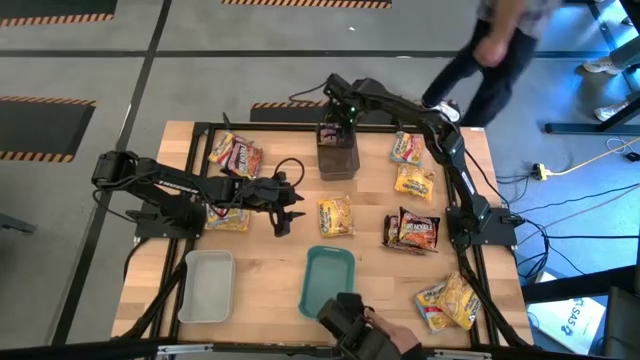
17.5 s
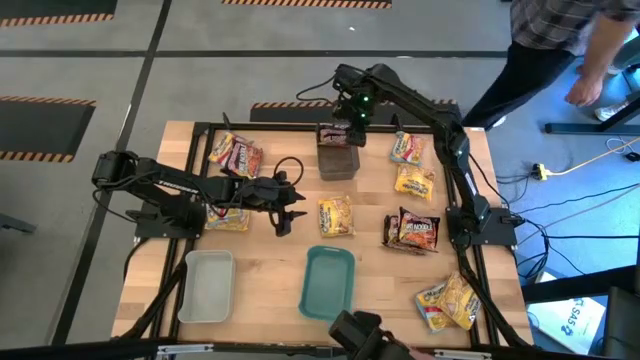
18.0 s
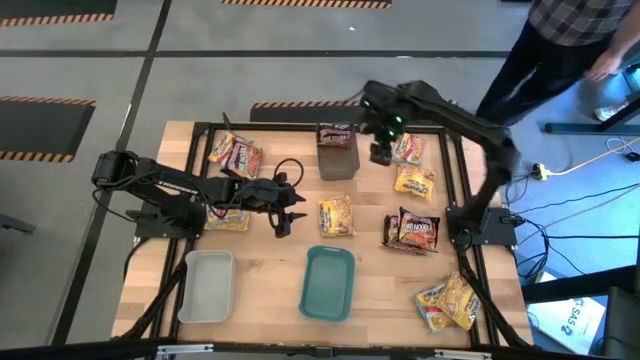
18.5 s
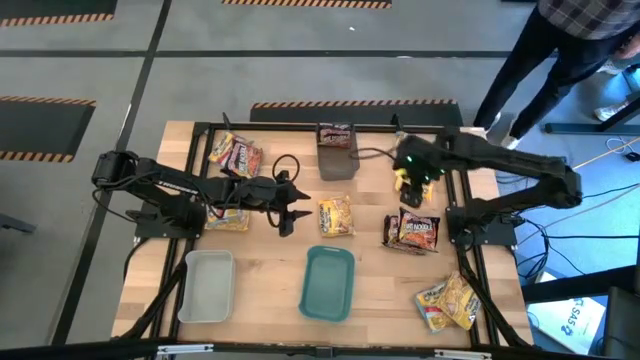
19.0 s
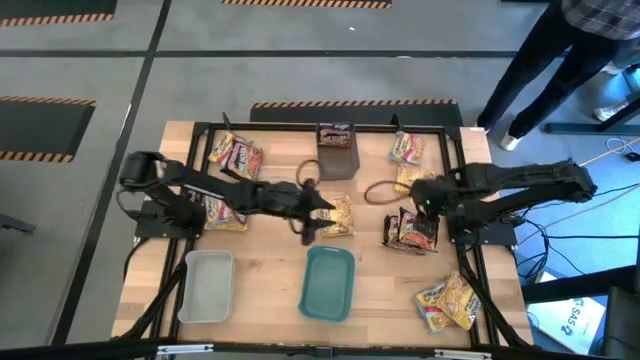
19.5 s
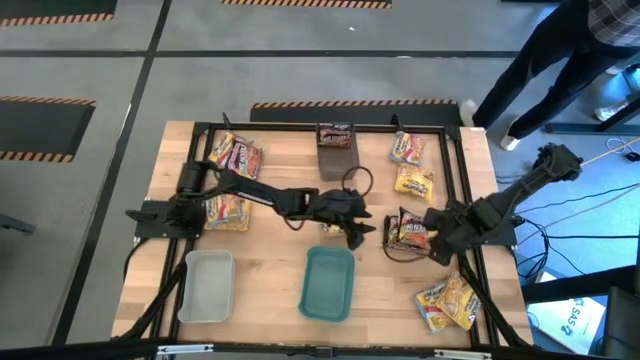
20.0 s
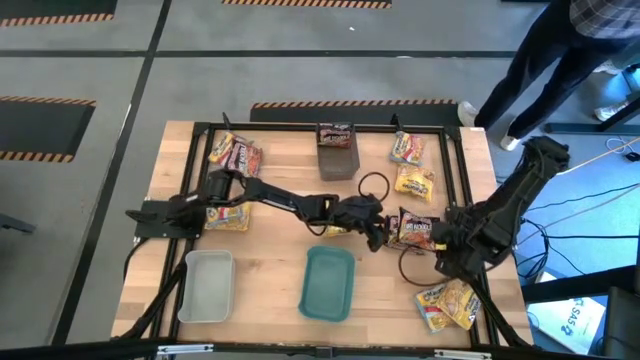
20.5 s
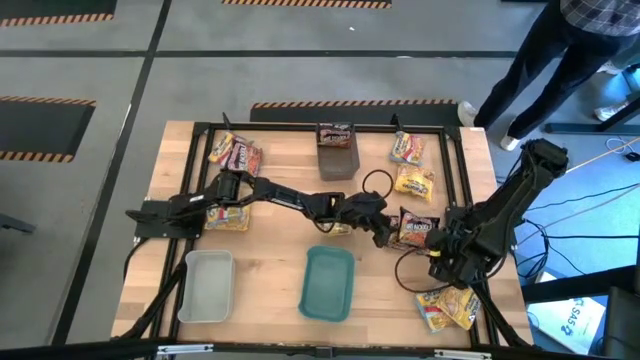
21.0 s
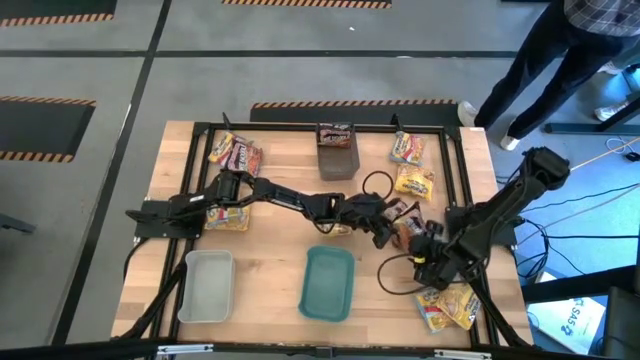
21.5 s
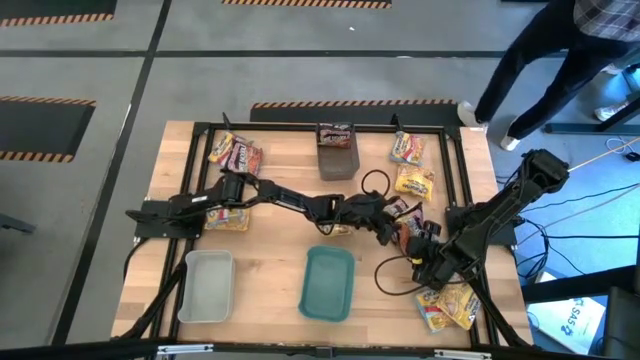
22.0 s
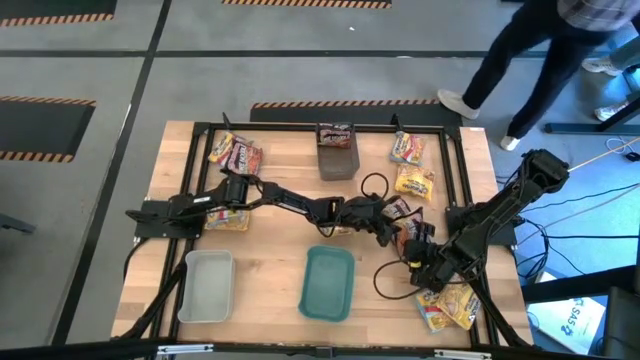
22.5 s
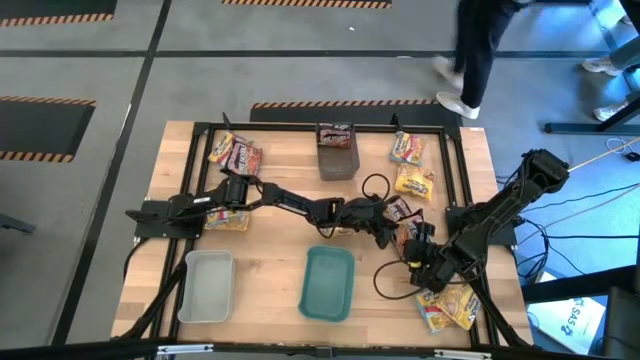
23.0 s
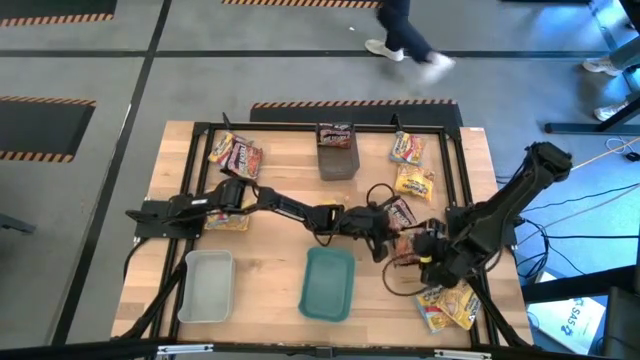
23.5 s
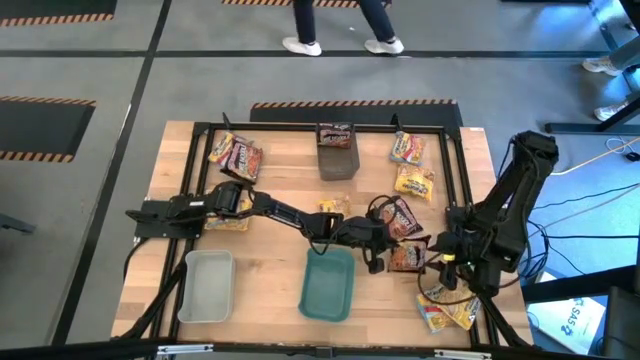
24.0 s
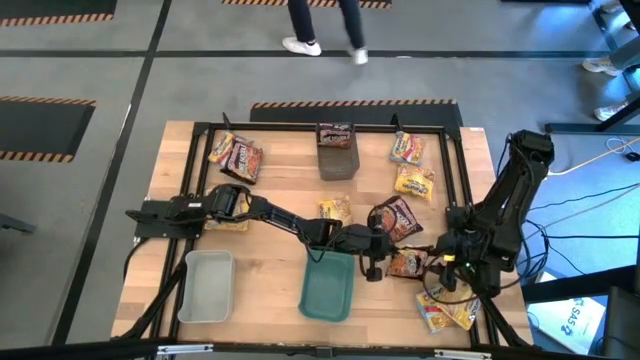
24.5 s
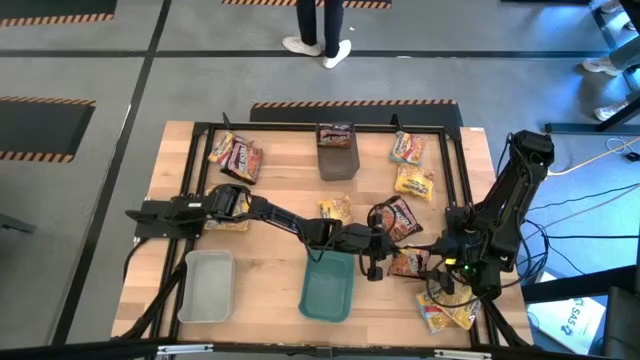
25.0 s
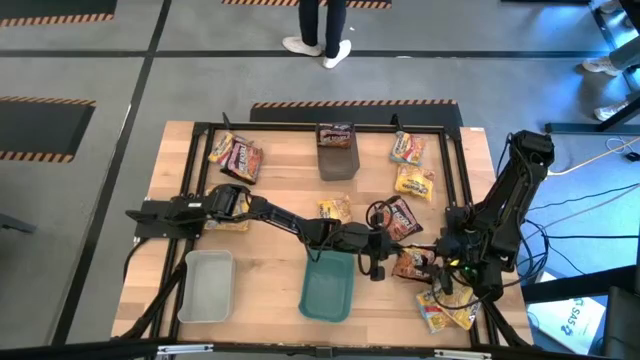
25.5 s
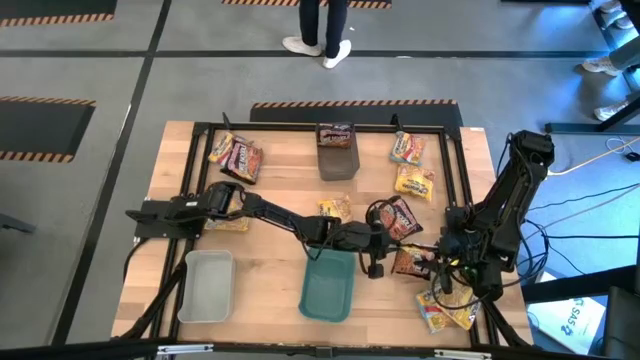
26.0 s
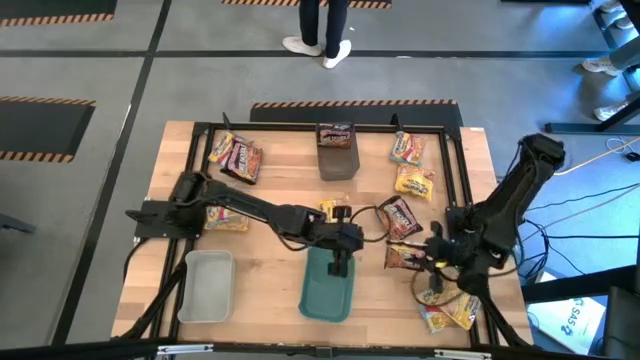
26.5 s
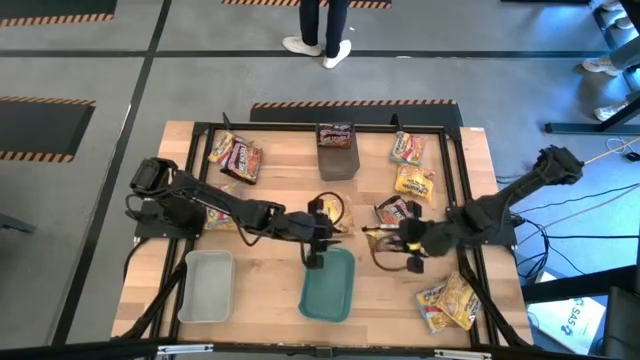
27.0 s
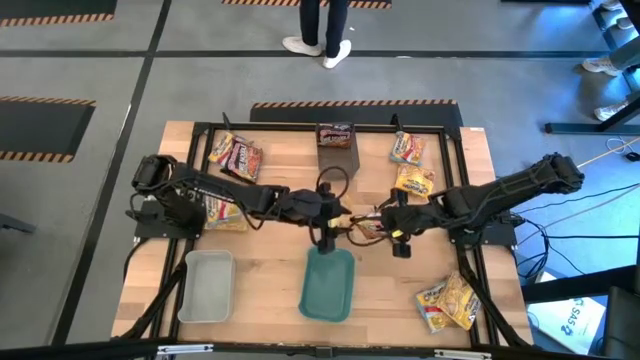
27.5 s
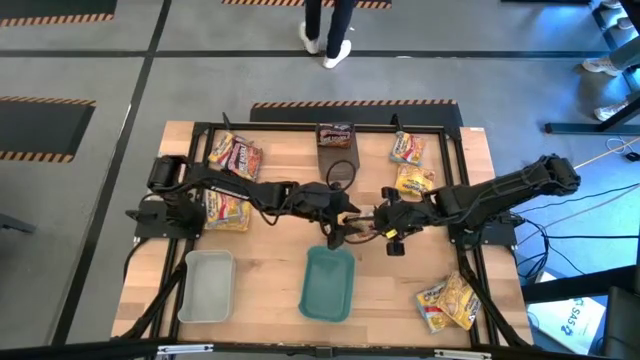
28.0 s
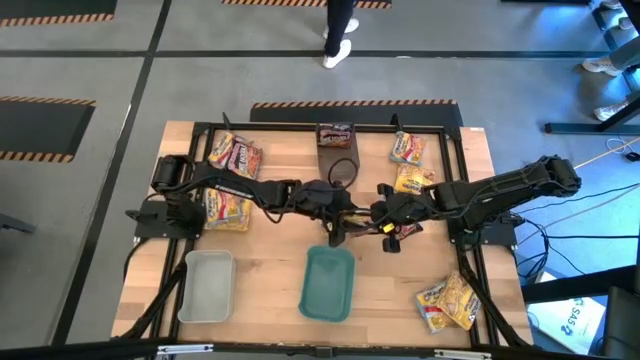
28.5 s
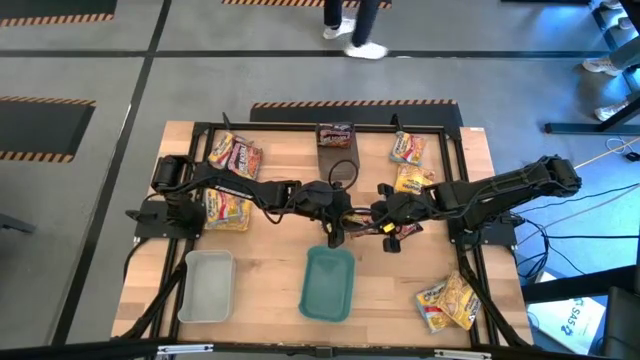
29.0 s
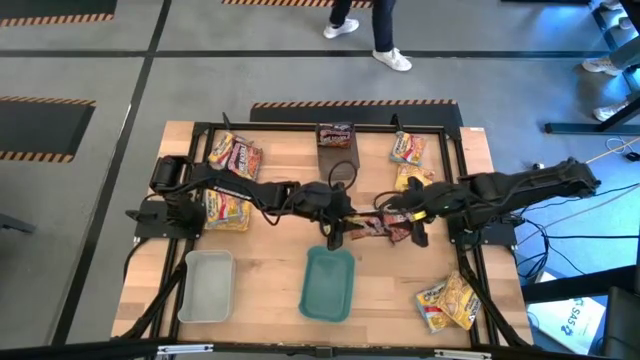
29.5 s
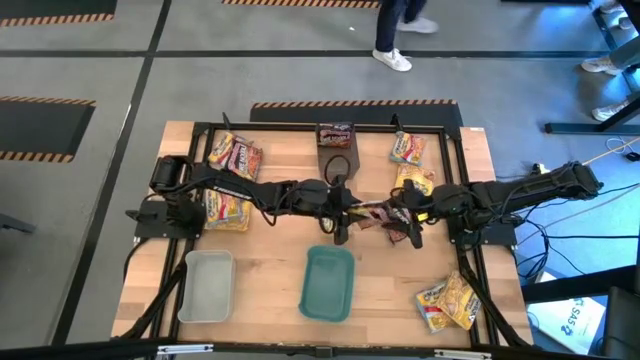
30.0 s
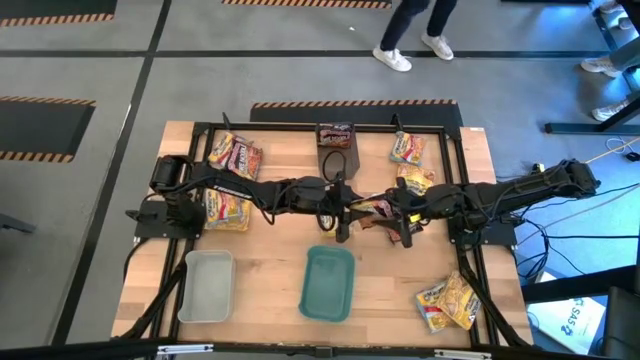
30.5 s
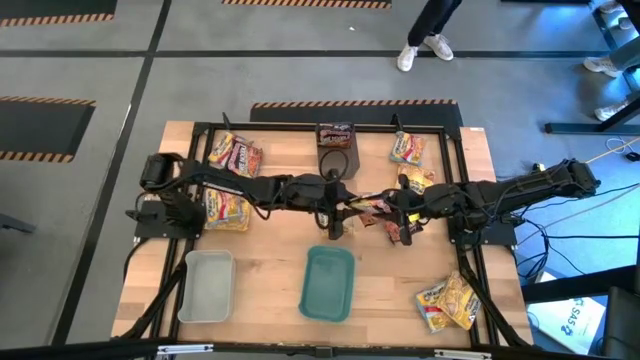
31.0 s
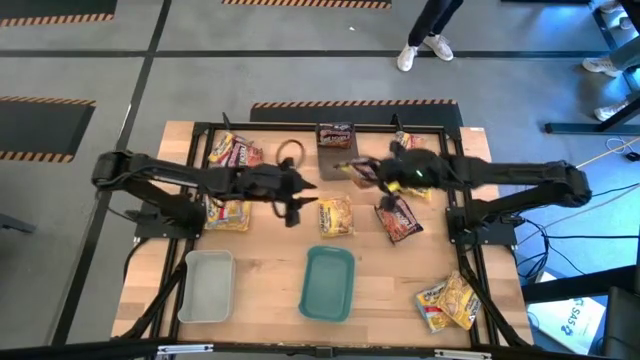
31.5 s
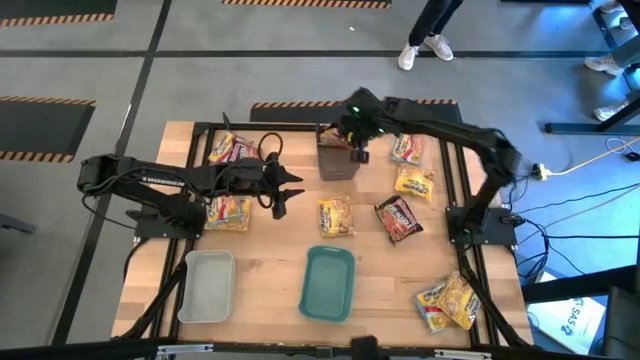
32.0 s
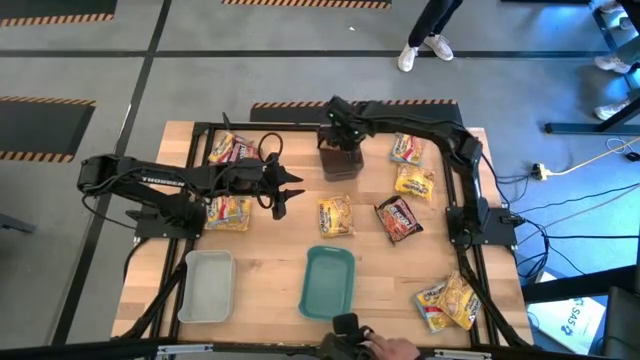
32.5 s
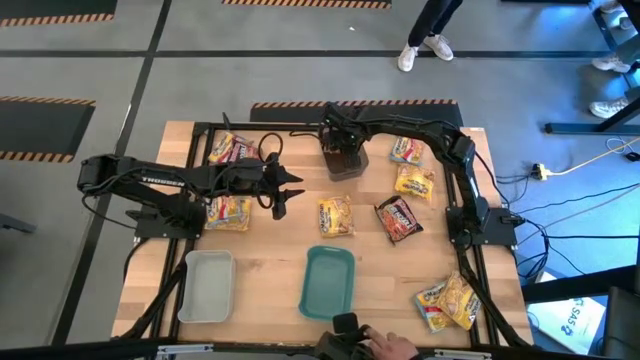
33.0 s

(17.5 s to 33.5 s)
Task: Sort Maruchan noodles
Put the black noodle pack into the black bin

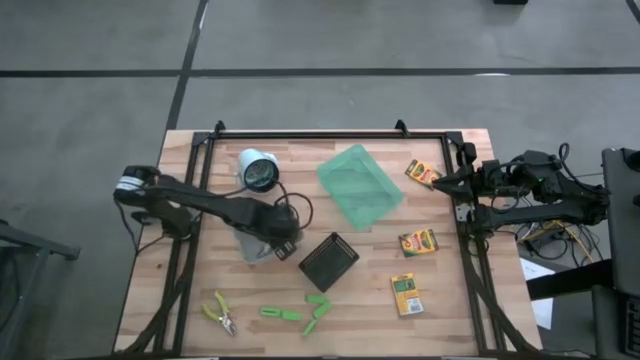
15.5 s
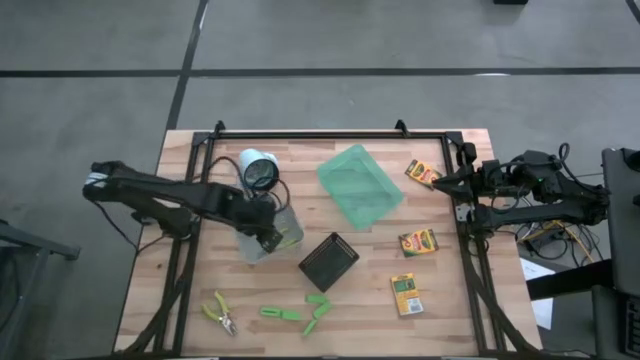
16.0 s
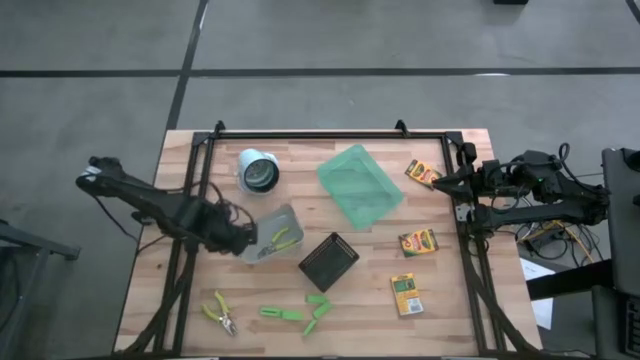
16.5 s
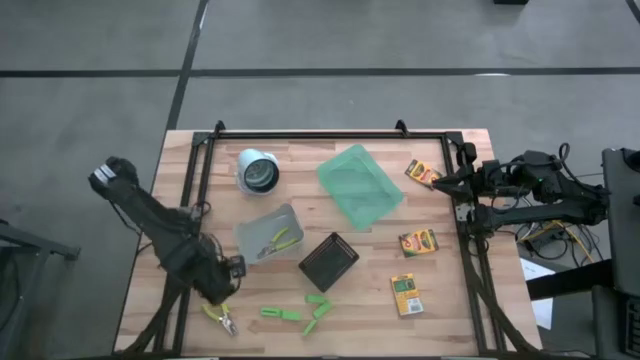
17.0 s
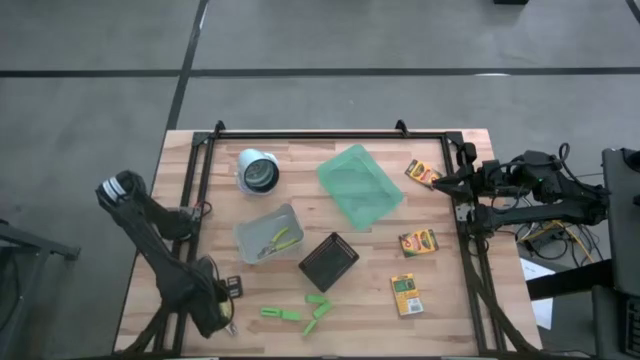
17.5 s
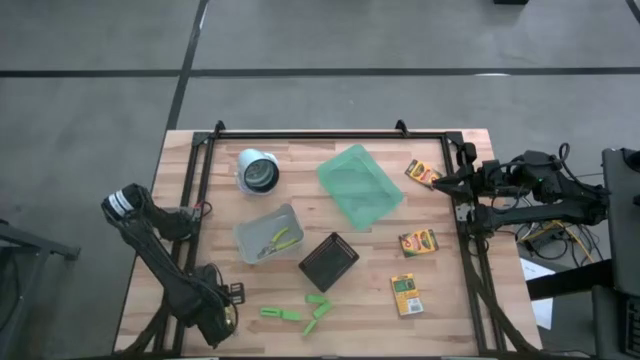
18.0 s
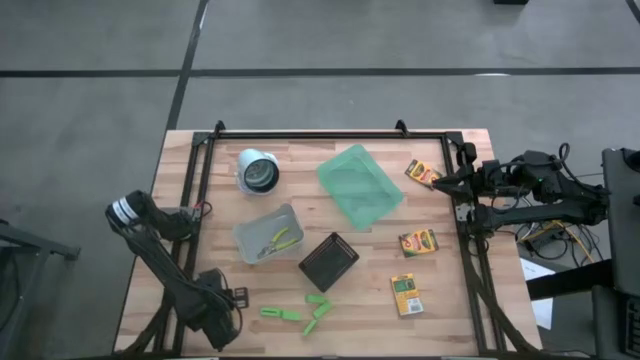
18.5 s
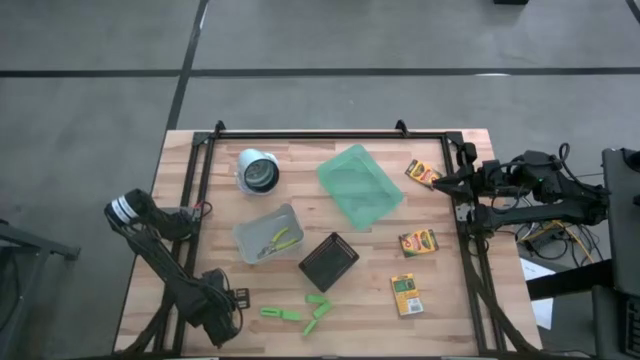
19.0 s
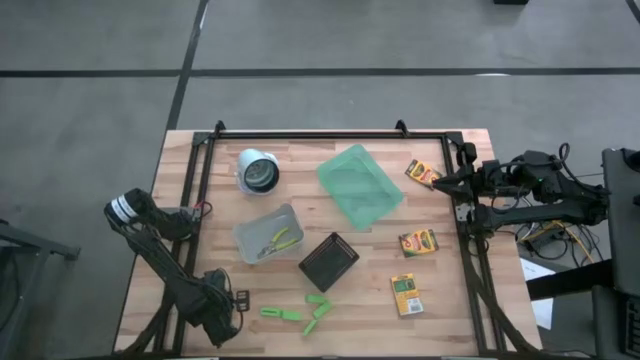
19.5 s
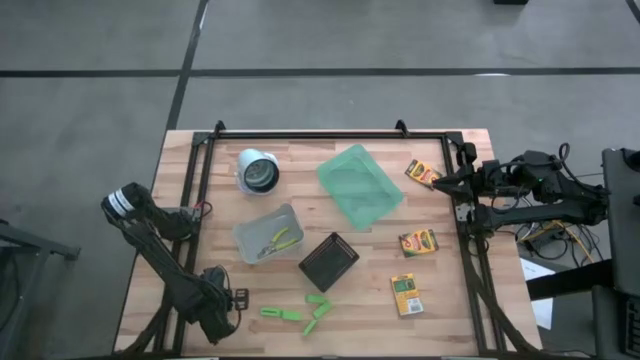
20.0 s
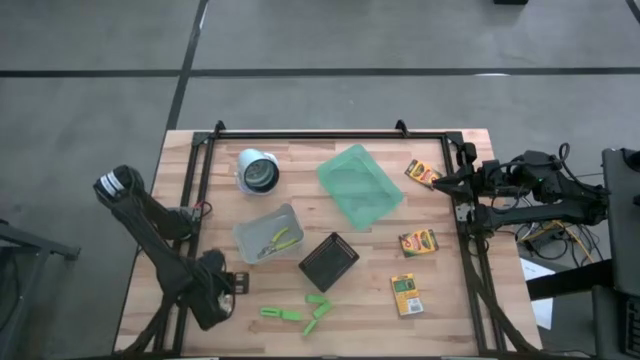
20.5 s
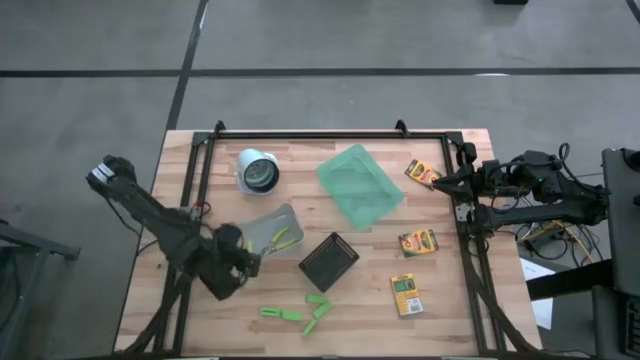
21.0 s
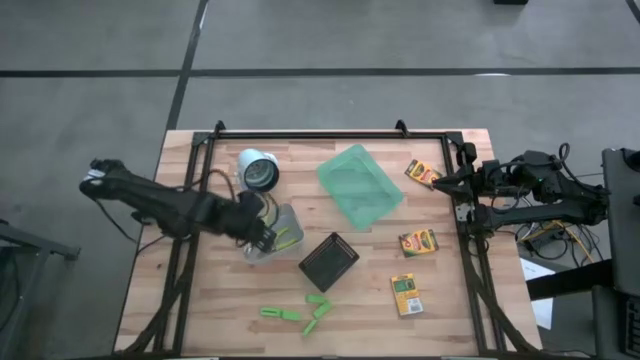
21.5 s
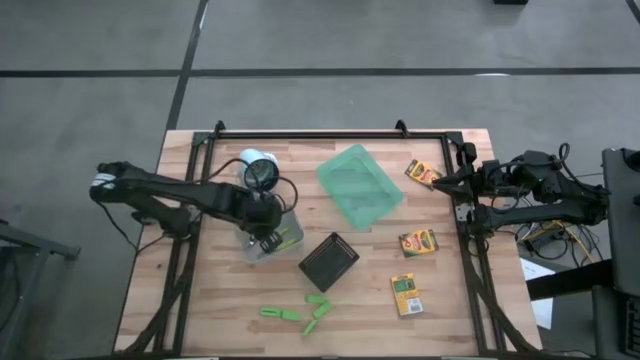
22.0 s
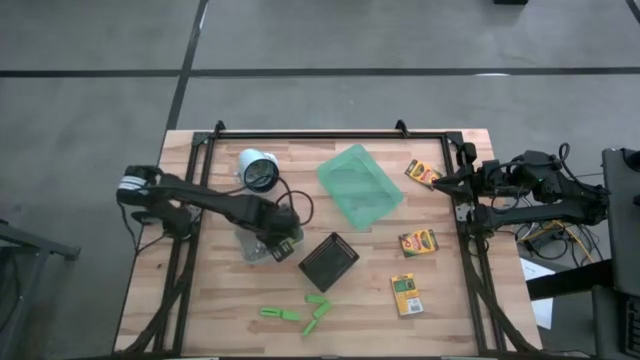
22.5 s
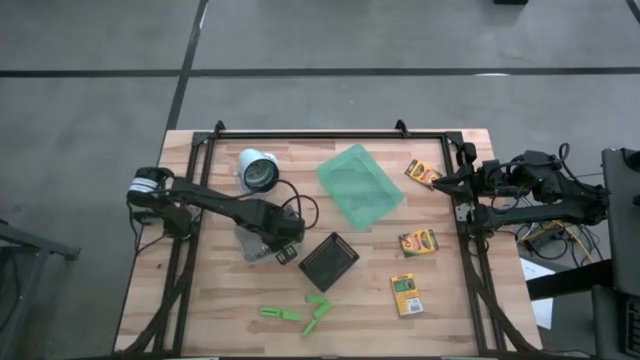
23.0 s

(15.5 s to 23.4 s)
Task: Pick & Place School Supplies
Put the yellow one hole puncher into the gray bin
